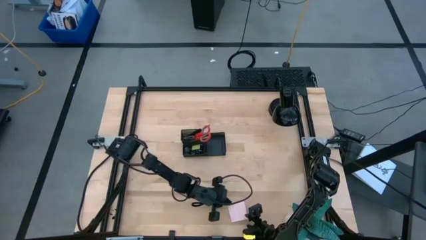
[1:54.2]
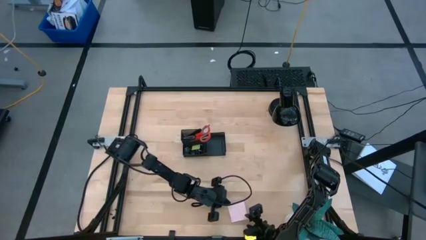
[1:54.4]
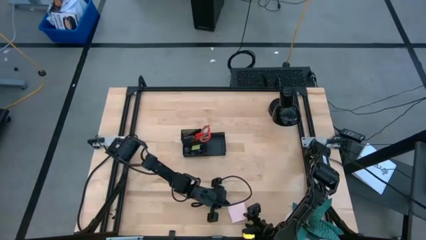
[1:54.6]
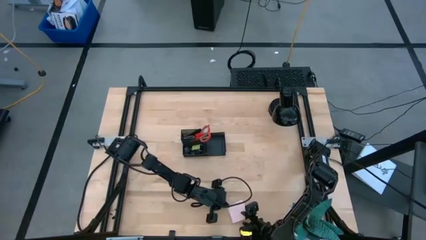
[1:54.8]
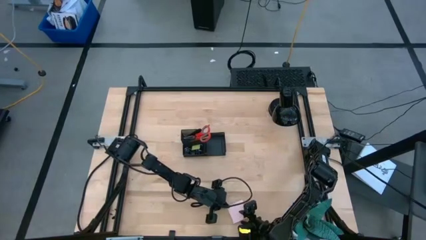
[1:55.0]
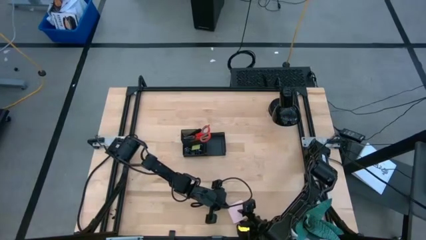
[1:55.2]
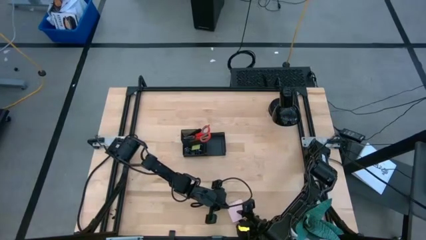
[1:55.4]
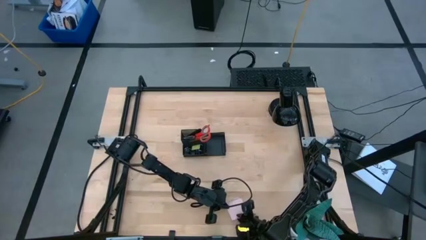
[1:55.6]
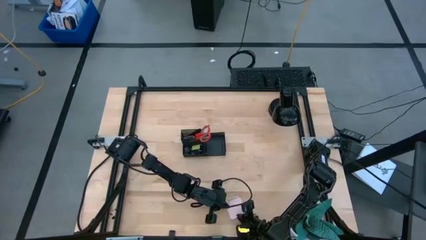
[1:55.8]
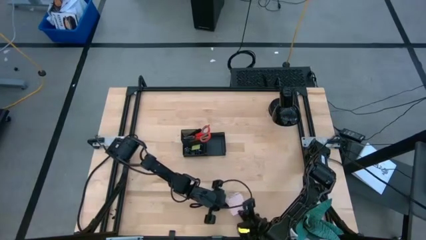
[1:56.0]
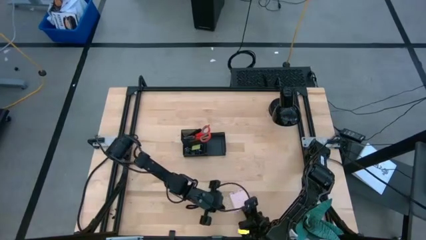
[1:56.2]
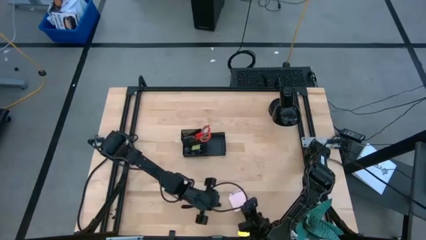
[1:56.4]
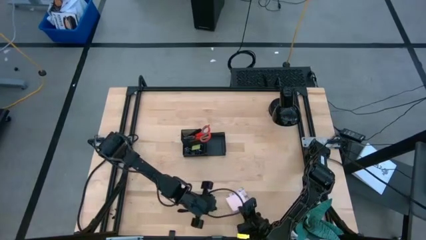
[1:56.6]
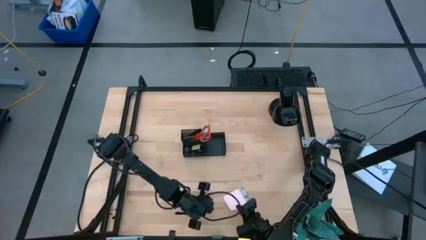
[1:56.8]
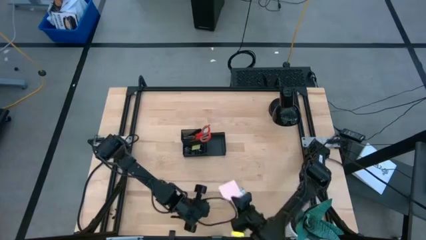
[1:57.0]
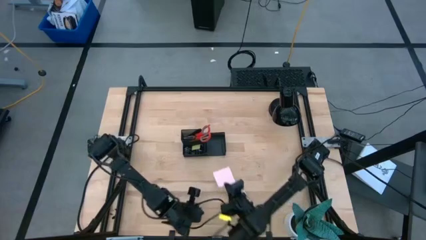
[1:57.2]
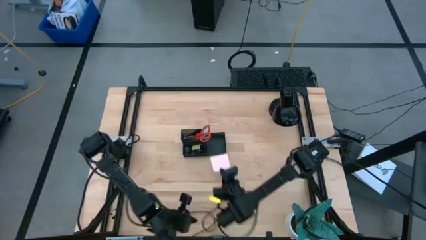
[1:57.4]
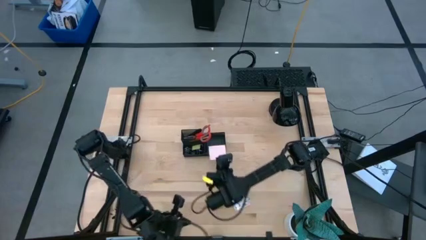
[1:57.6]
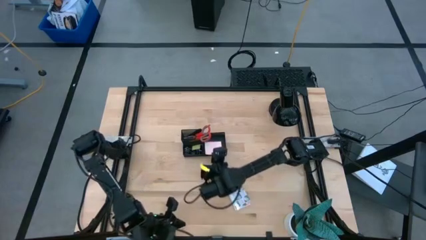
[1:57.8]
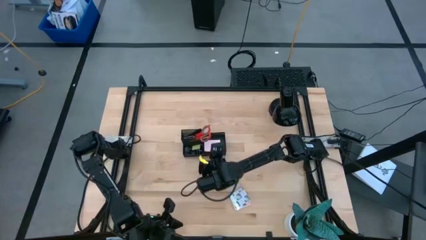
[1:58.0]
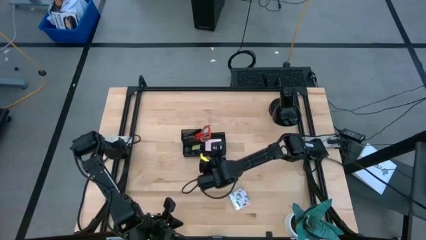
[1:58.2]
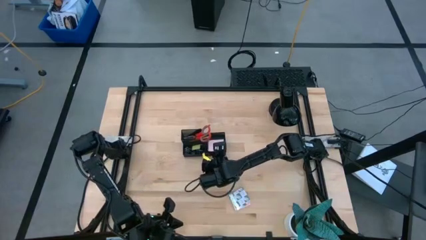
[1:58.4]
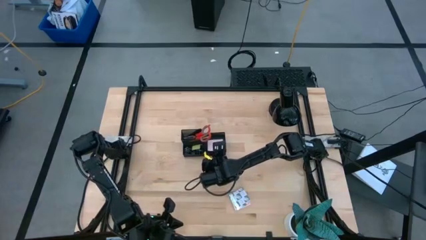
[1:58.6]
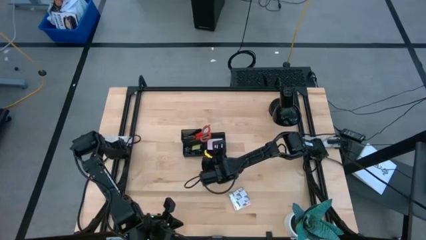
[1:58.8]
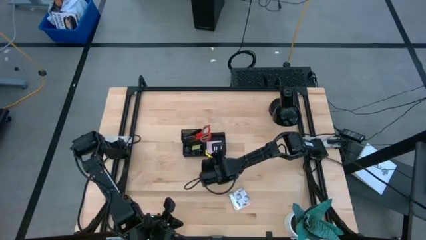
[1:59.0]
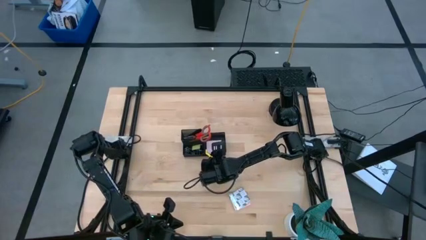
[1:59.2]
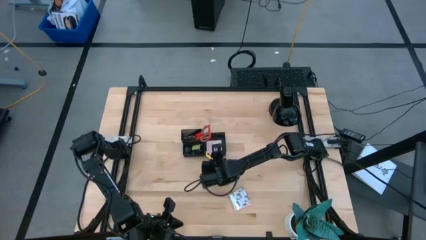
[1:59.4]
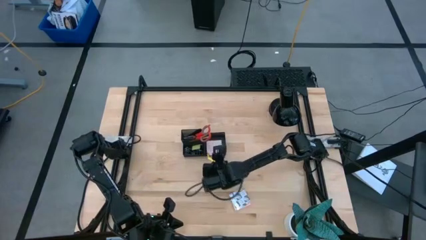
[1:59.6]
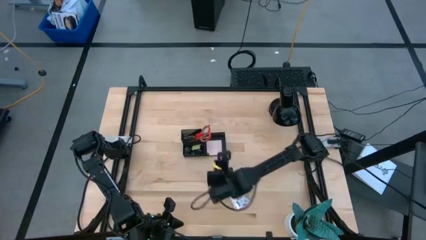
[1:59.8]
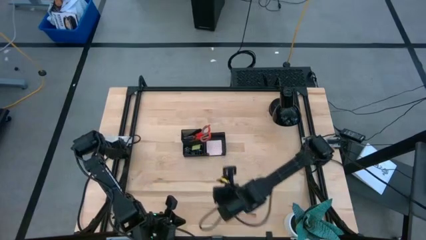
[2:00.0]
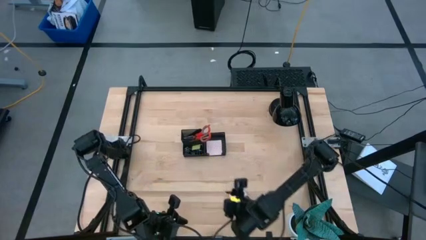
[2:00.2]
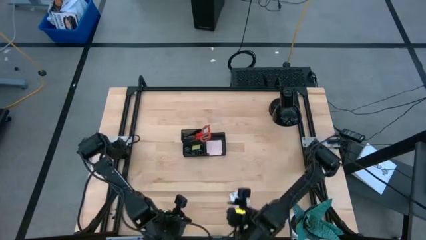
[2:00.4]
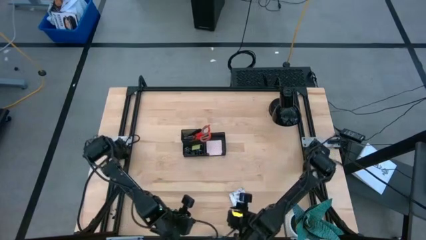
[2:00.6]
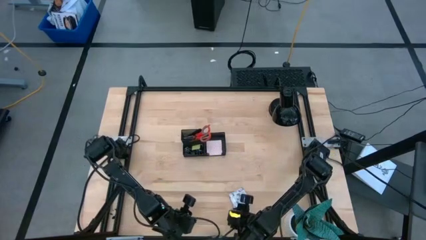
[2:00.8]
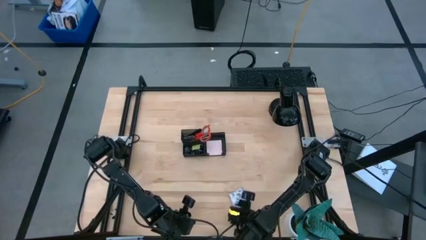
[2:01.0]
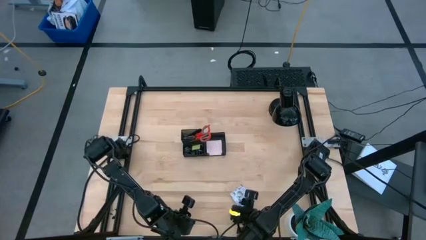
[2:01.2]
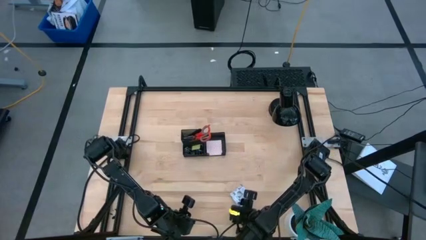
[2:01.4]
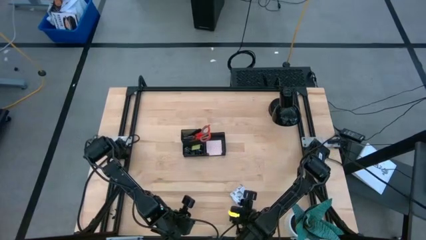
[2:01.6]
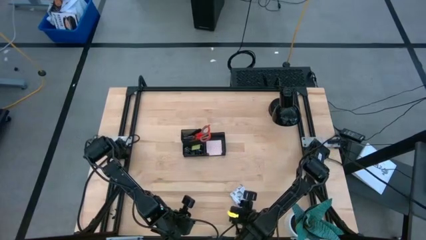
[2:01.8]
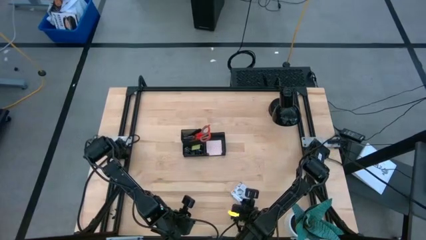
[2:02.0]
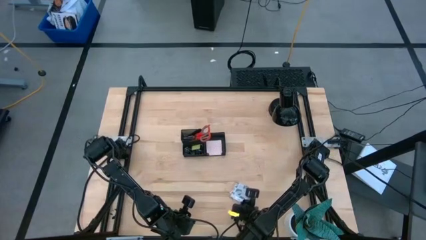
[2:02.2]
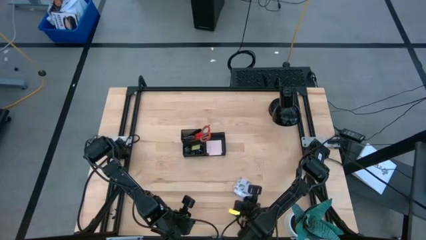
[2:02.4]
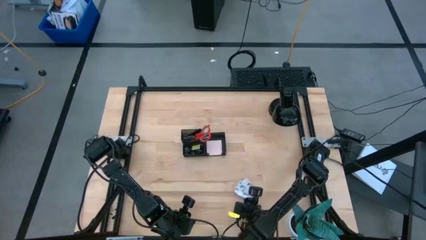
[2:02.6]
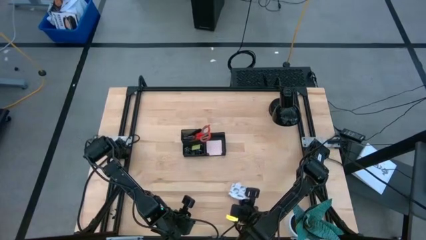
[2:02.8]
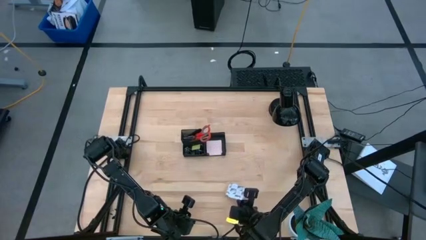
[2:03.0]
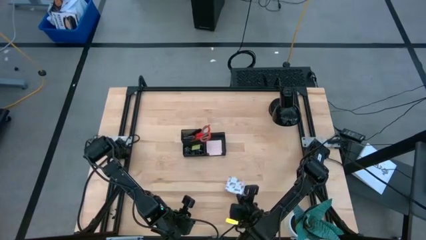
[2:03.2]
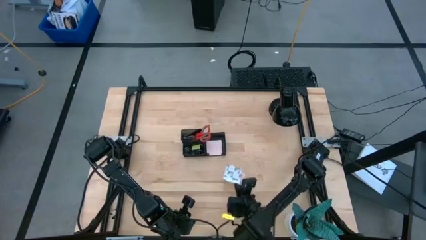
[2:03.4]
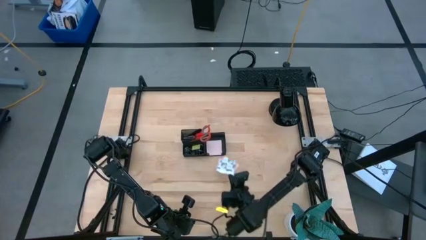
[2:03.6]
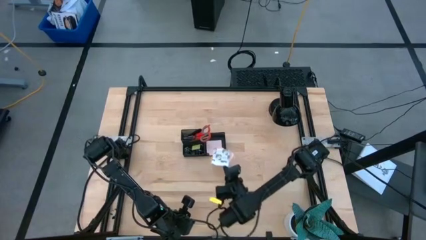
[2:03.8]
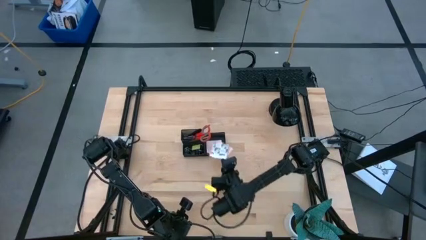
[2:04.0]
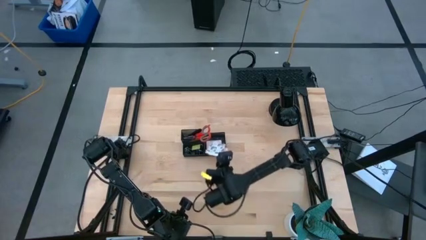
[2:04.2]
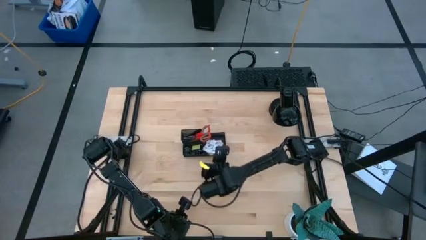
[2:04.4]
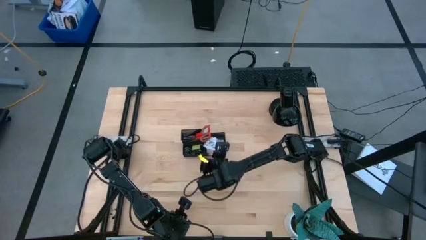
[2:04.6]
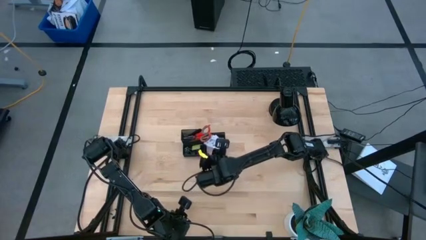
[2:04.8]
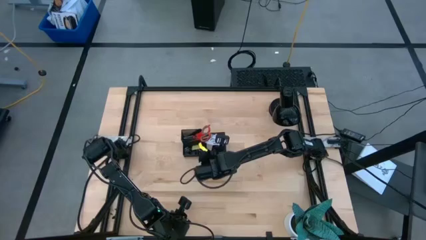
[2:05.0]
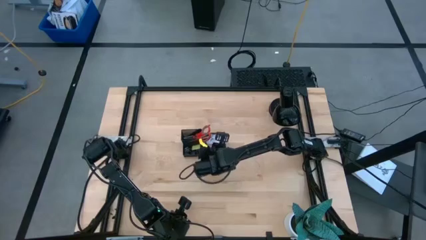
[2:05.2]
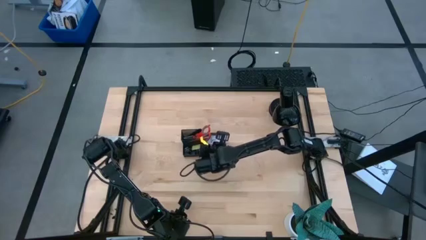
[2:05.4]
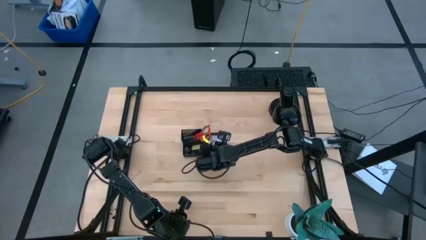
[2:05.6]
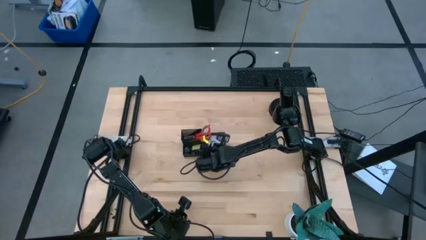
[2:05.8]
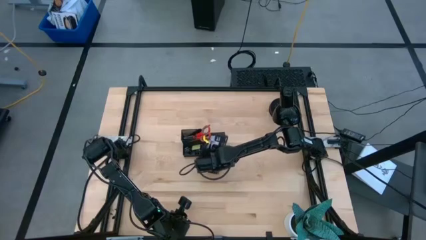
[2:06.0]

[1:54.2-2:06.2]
Task: Pick and place office supplies into organizer
Put the pink sticky notes into the black desk organizer
